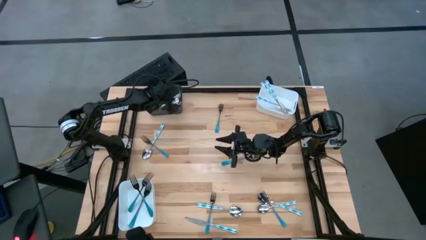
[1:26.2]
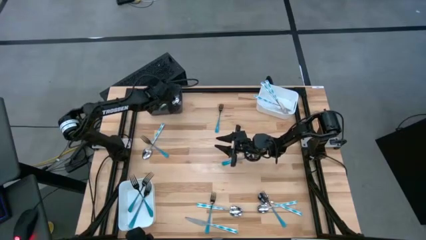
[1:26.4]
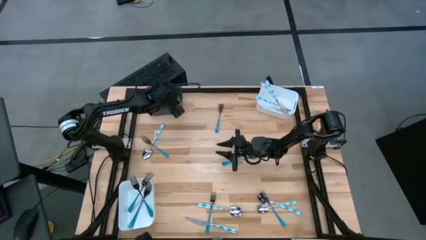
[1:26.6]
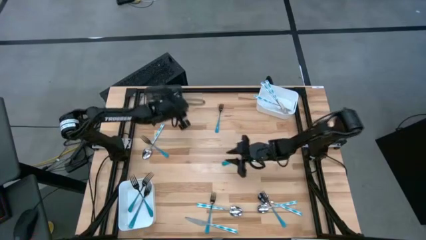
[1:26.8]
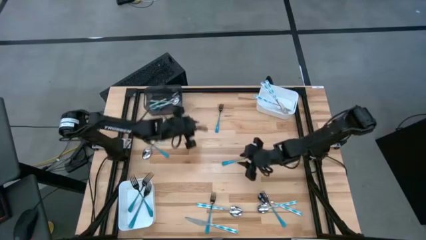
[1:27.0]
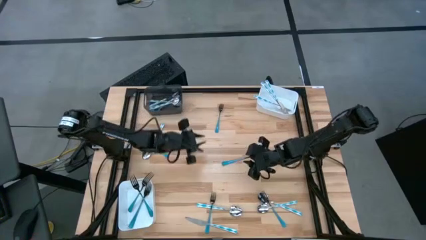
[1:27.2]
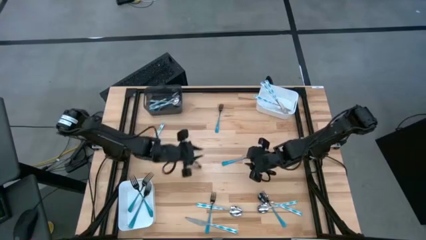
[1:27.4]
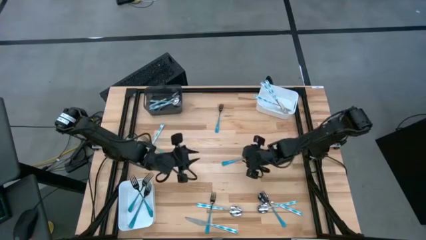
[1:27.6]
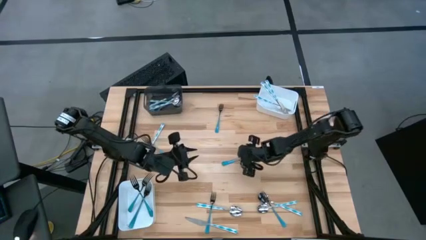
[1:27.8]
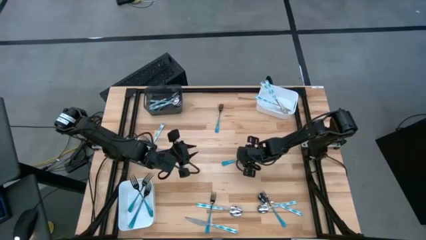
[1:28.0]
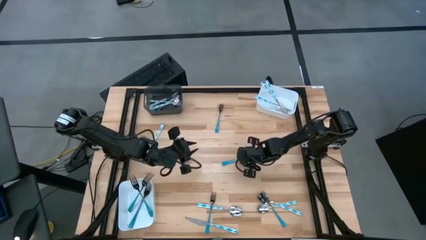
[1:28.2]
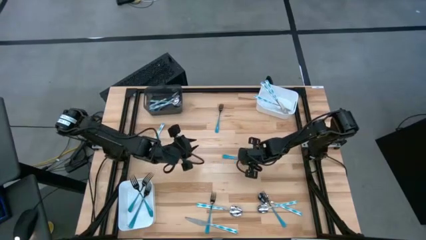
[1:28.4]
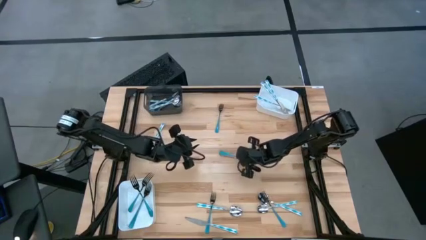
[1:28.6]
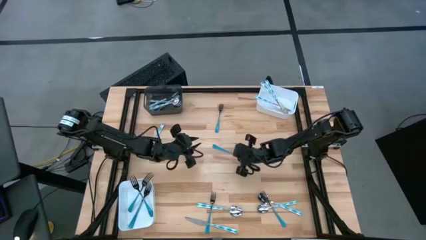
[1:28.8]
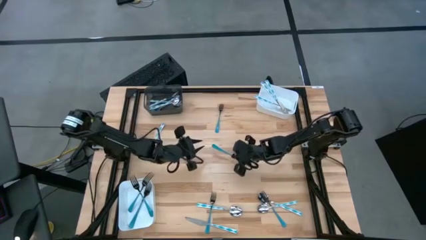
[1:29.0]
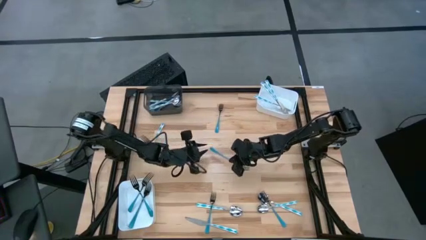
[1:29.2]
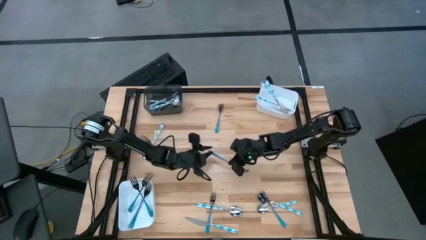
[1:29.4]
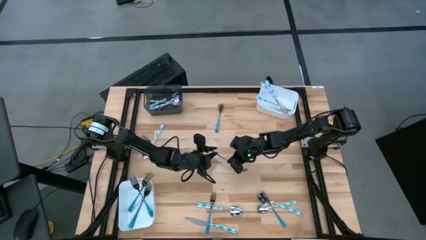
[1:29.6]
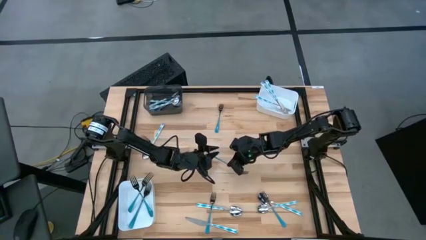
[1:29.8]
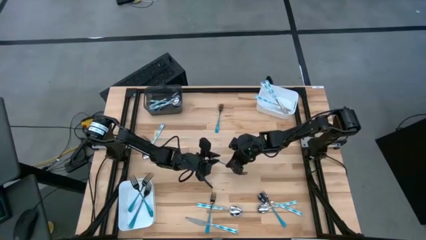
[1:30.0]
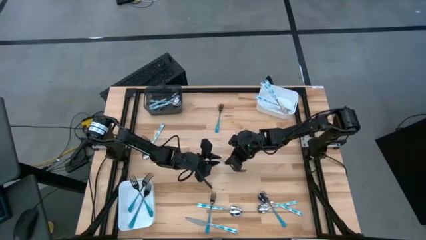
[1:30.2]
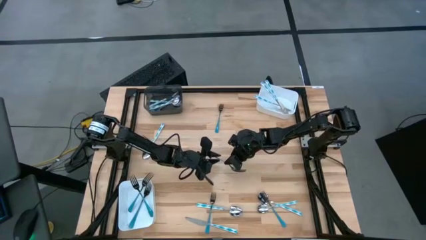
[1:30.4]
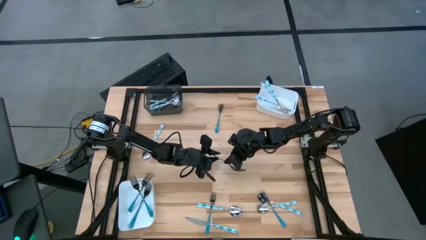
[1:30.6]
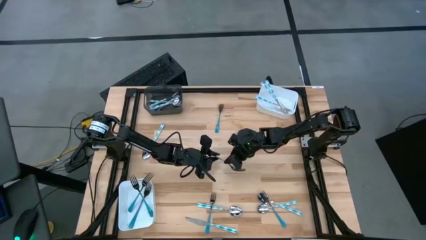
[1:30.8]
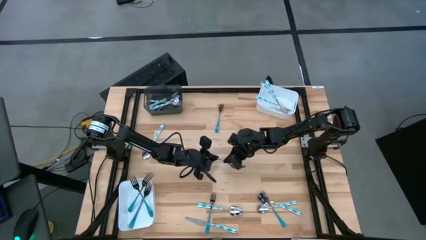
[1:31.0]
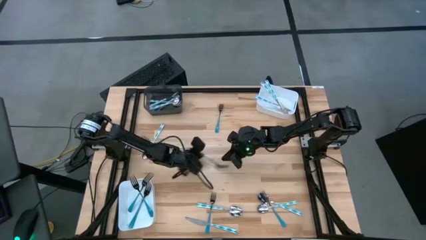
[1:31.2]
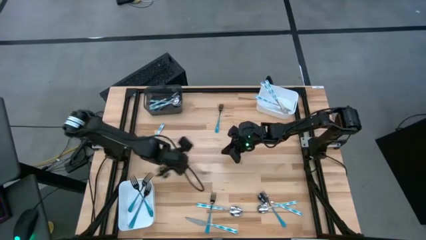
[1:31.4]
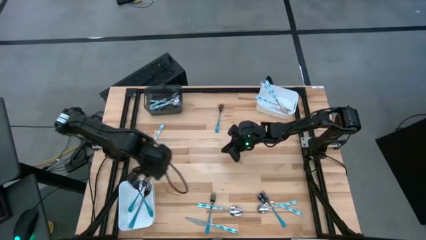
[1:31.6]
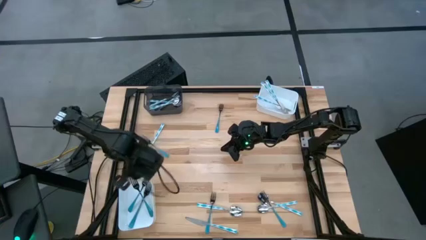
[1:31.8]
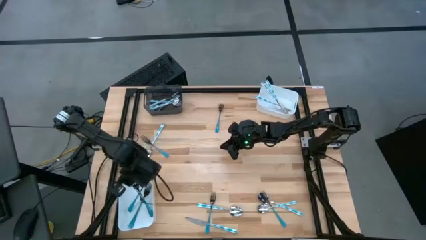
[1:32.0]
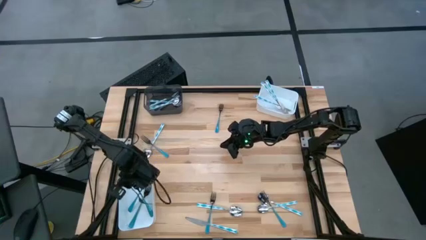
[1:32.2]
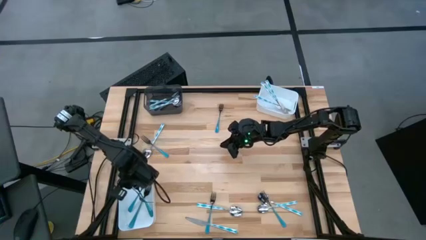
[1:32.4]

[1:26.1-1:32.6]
Task: Sort silverware by color (type)
Put the blue fork into the bottom white bin

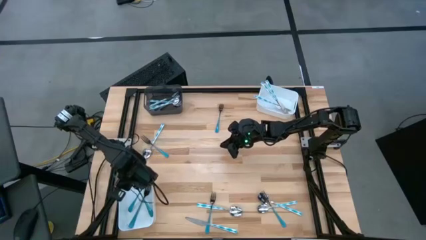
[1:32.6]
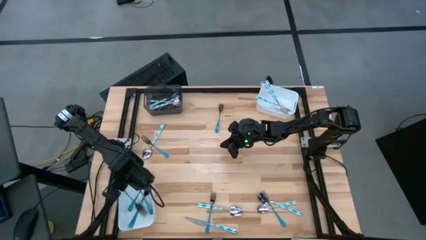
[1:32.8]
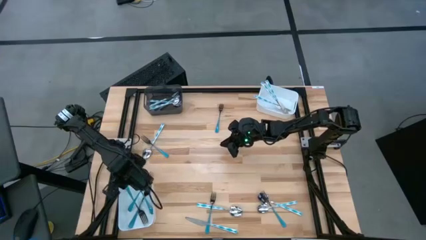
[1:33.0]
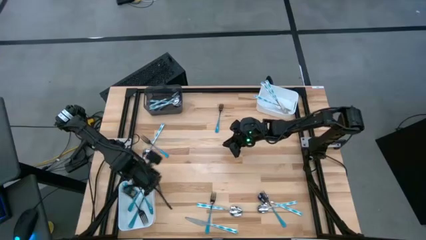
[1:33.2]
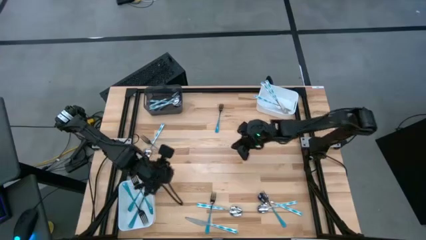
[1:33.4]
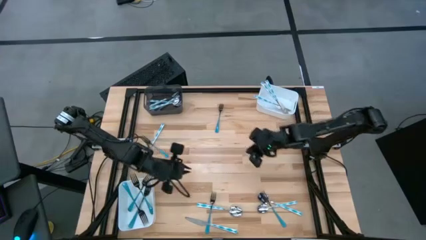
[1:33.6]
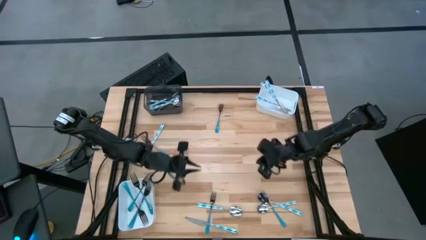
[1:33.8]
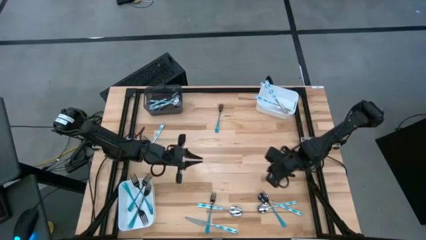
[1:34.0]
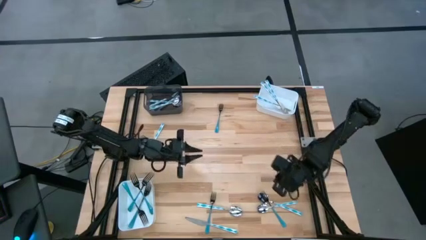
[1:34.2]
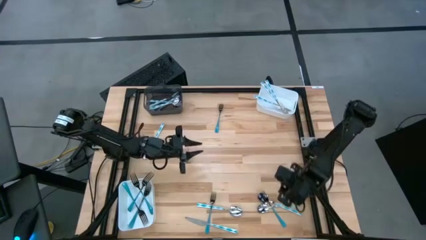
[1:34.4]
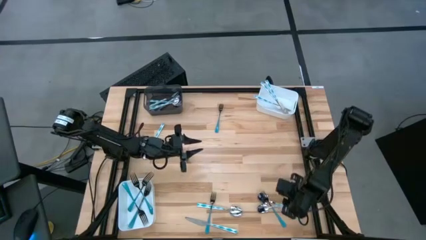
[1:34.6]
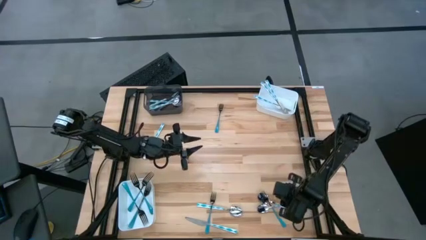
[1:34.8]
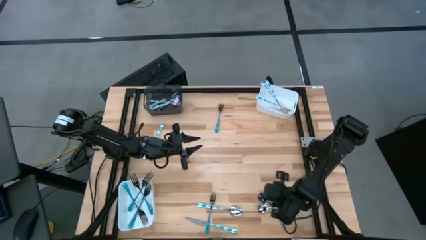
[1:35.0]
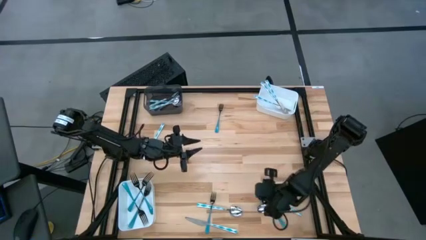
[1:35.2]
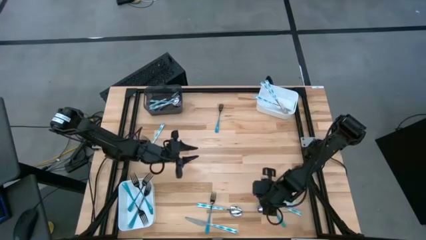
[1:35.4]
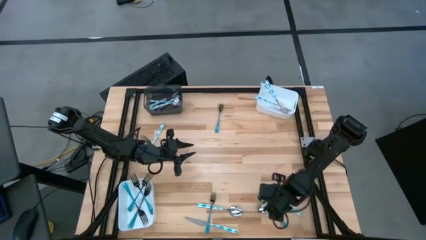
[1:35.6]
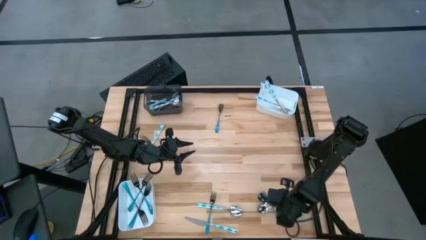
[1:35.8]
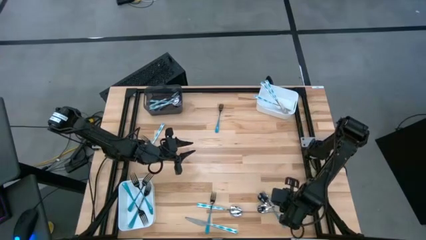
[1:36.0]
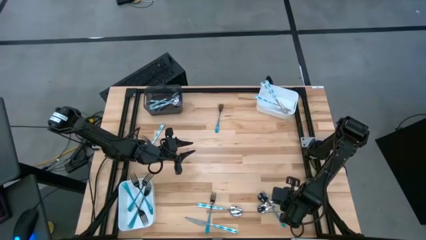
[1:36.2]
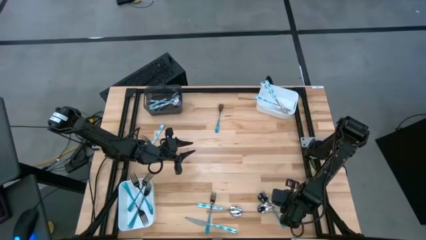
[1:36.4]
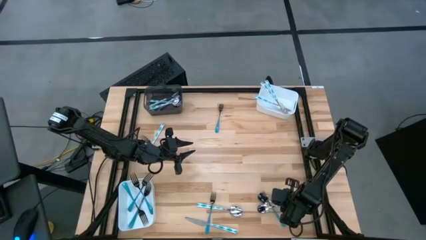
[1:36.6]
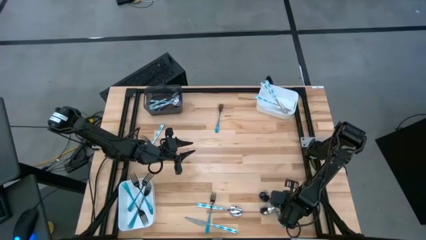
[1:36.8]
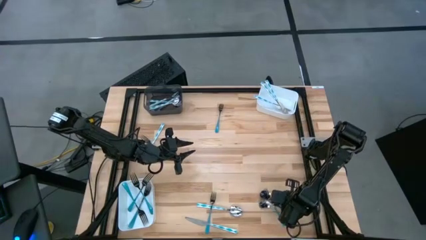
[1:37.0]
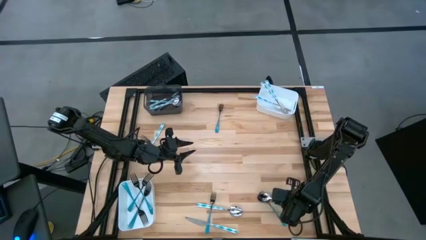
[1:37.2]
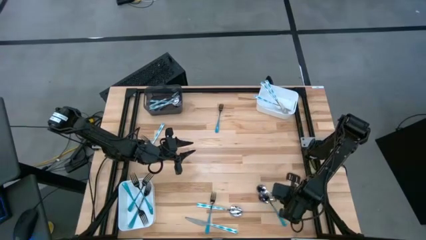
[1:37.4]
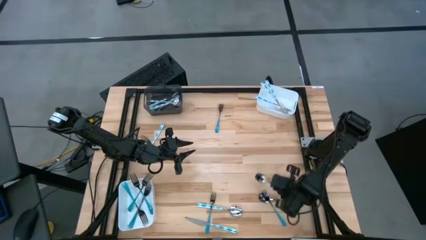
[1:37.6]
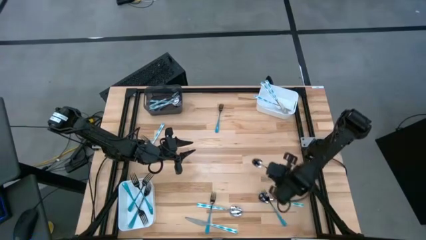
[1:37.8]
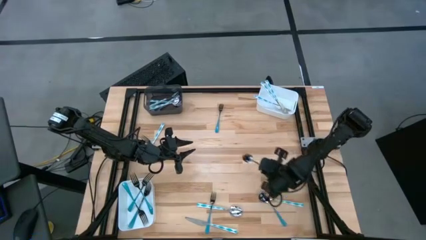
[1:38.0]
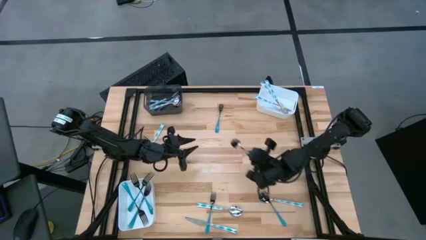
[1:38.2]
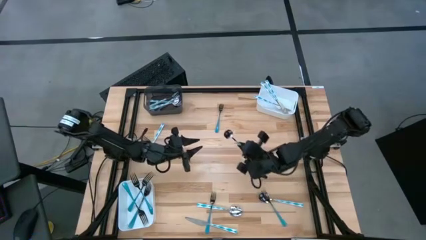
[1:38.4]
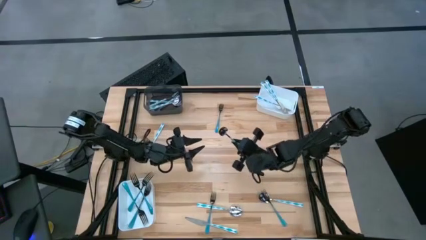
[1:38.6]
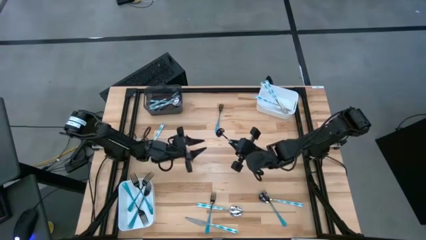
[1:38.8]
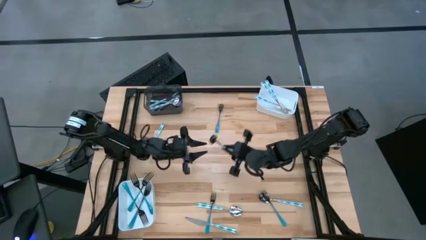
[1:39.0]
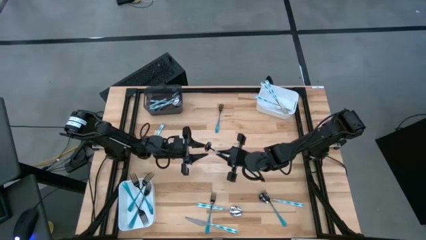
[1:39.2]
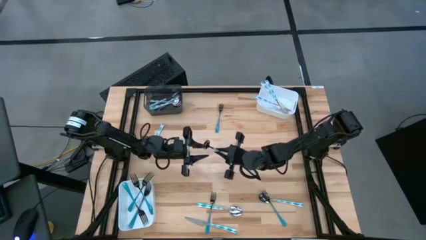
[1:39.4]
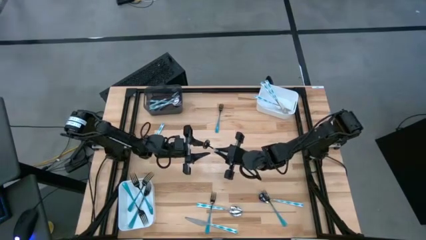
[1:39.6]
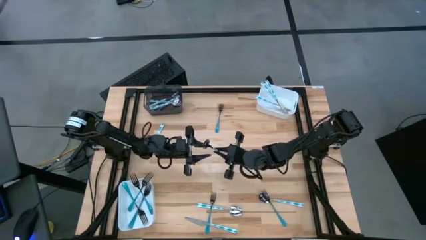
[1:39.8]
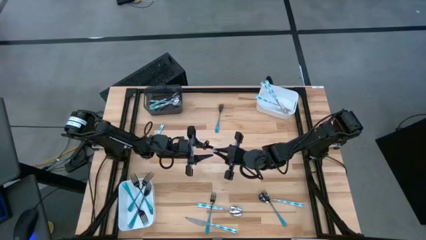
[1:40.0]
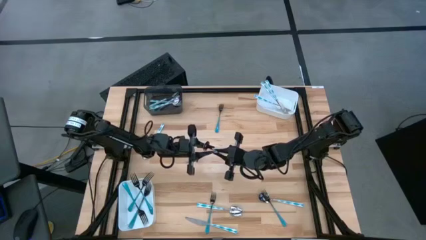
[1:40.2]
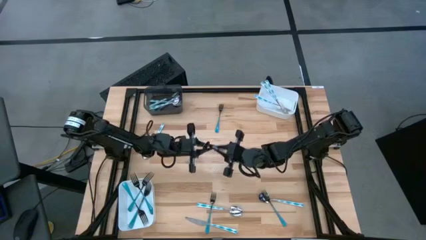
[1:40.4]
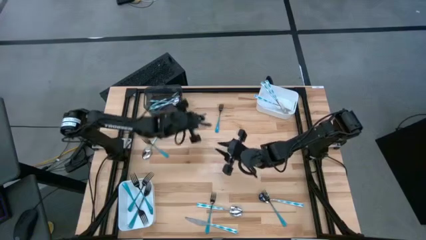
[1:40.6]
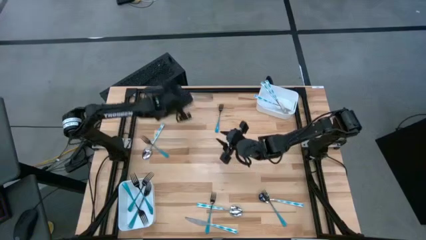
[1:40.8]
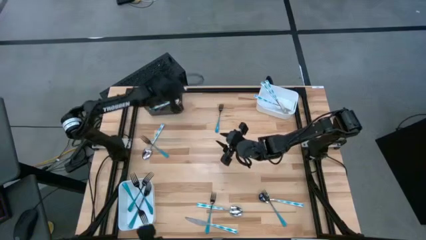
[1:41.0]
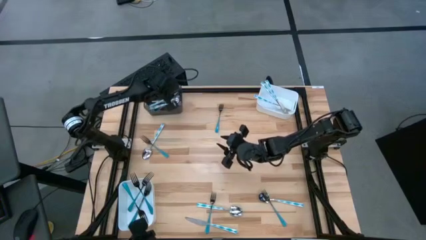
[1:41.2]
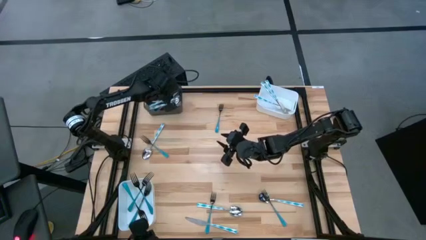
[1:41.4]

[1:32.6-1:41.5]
Put the blue patterned spoon into the black bin

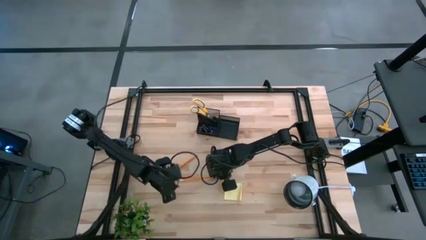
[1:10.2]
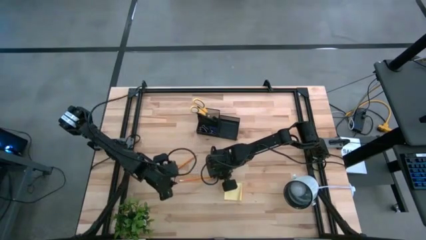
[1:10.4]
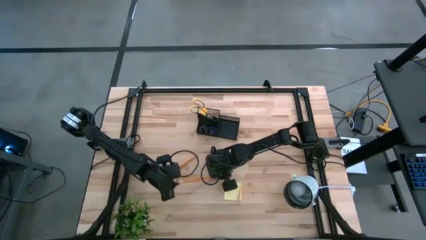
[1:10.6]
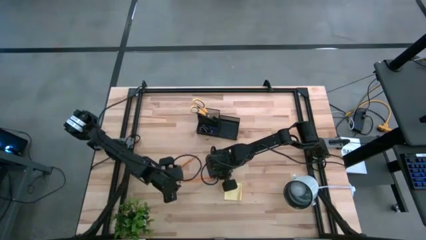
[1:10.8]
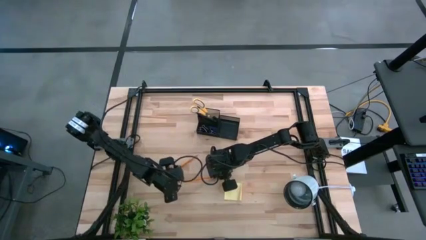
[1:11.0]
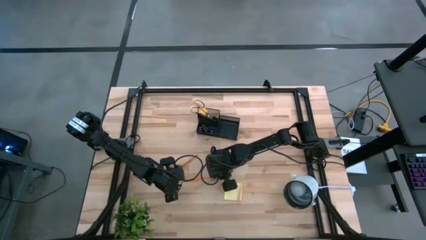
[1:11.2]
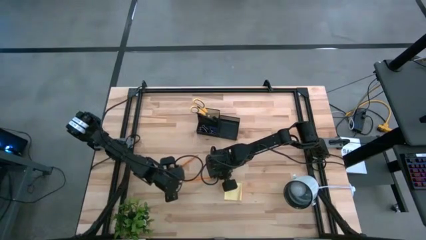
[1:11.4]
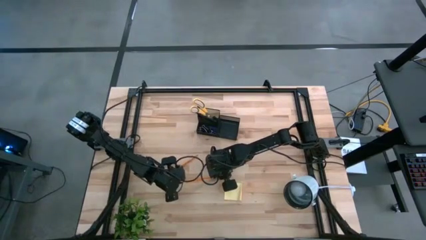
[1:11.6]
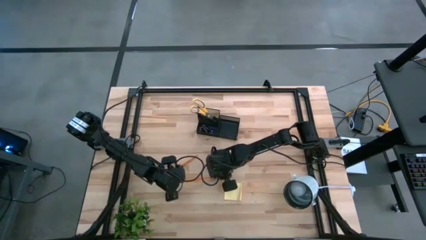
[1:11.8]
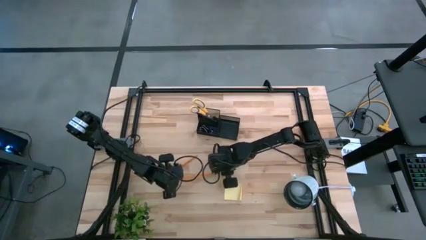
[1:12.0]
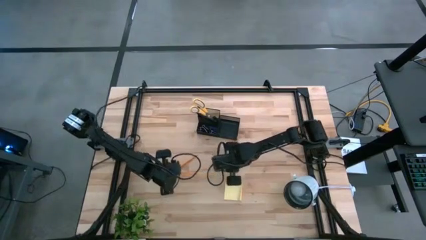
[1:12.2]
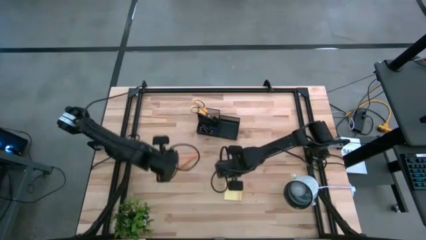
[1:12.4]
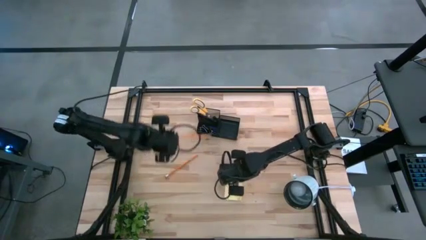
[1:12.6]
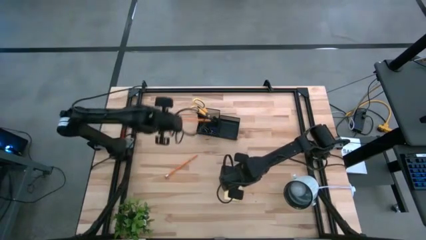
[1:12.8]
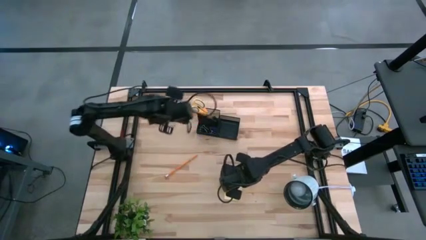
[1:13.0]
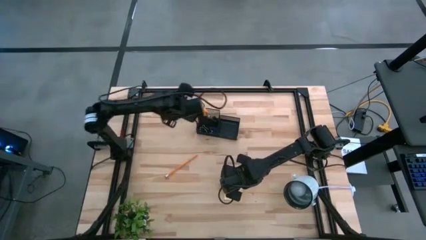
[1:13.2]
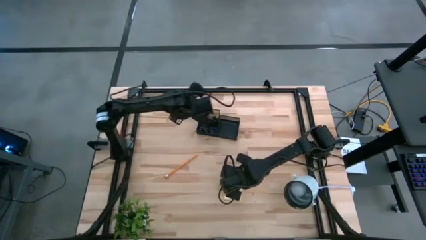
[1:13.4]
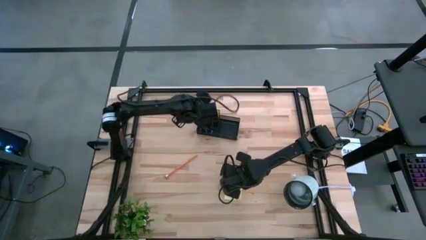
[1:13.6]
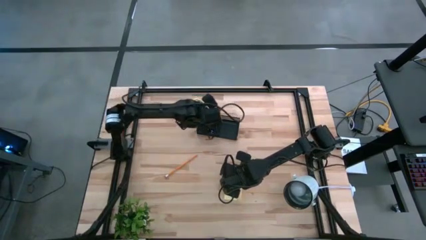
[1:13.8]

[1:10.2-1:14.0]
Task: Pick and place office supplies into organizer
Put the bottom orange pencil into the black organizer bin
